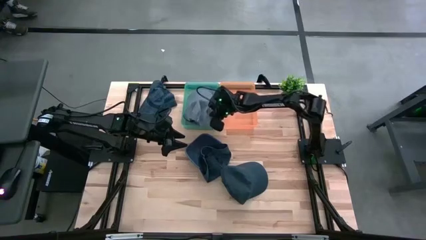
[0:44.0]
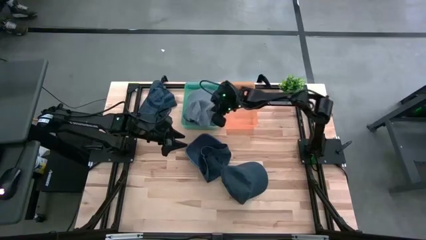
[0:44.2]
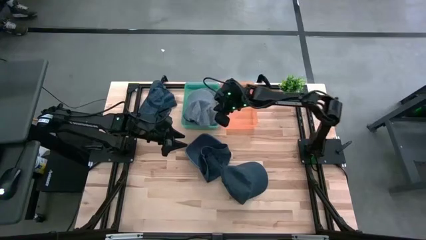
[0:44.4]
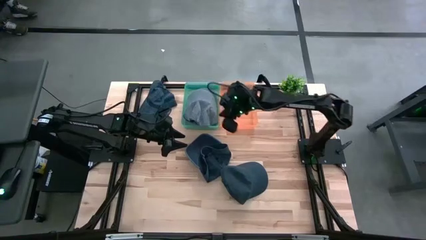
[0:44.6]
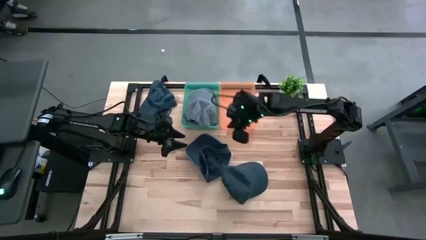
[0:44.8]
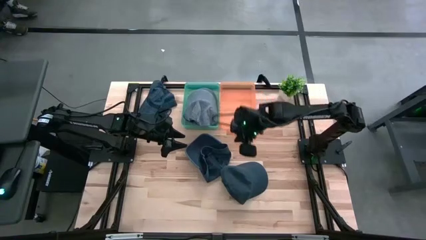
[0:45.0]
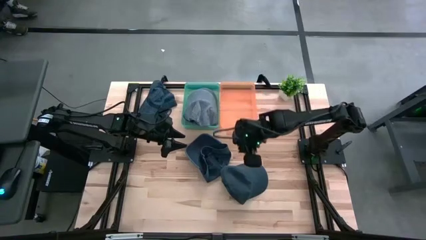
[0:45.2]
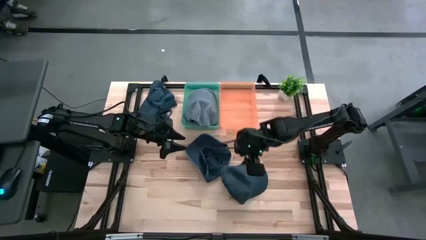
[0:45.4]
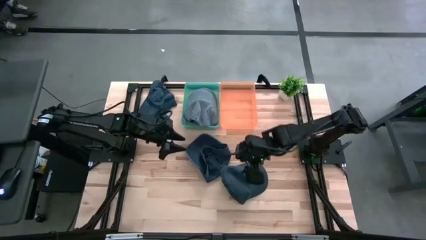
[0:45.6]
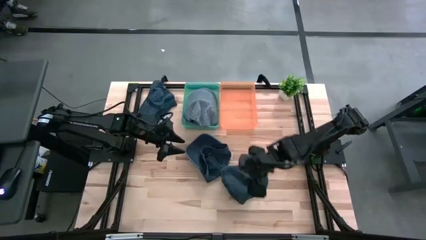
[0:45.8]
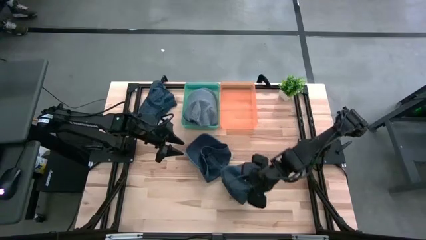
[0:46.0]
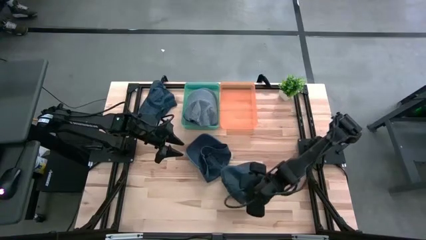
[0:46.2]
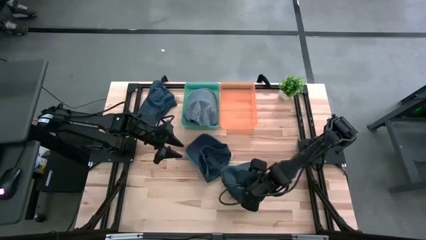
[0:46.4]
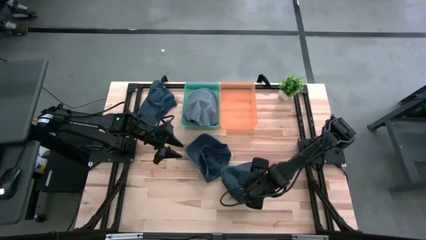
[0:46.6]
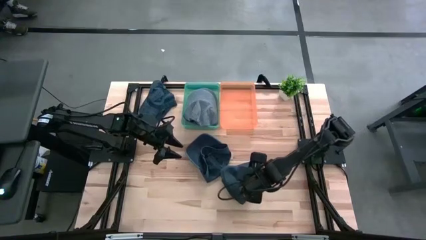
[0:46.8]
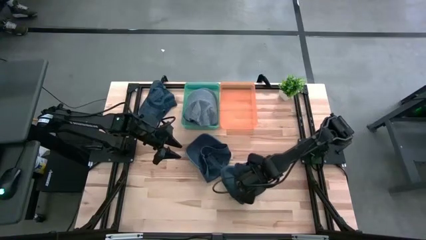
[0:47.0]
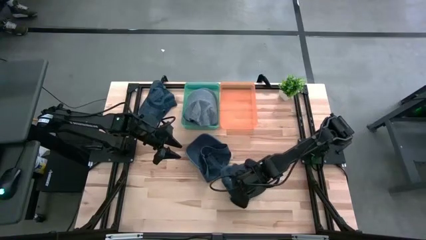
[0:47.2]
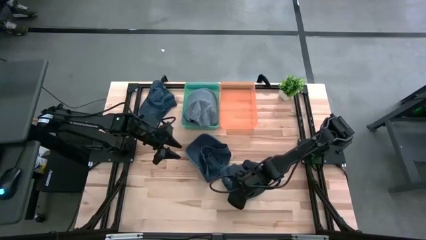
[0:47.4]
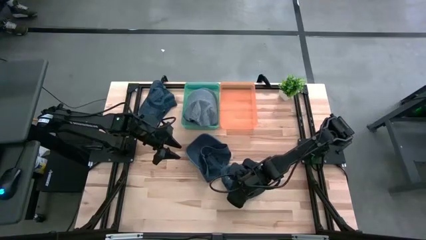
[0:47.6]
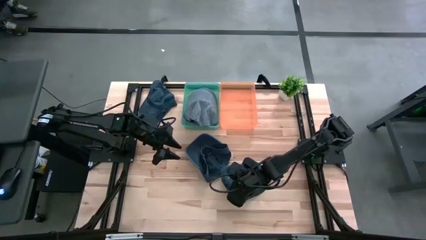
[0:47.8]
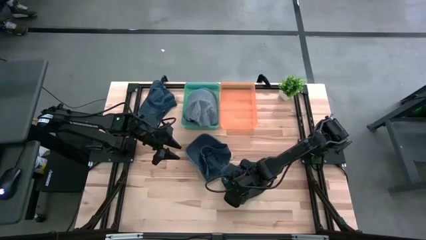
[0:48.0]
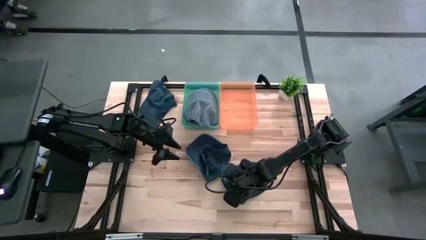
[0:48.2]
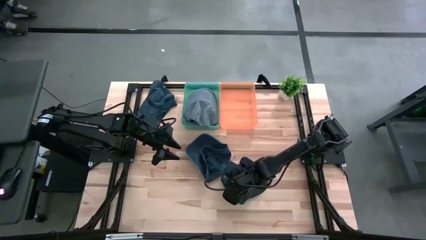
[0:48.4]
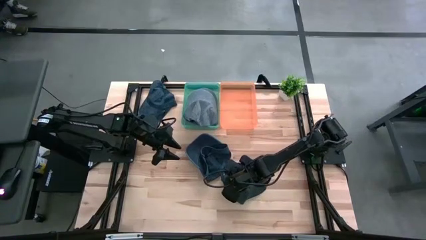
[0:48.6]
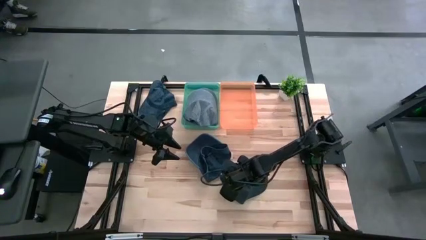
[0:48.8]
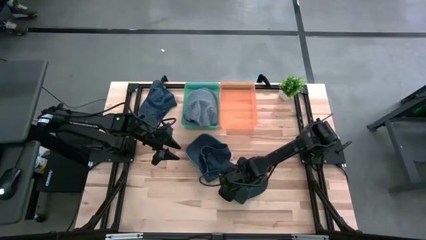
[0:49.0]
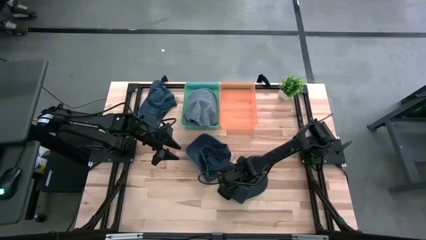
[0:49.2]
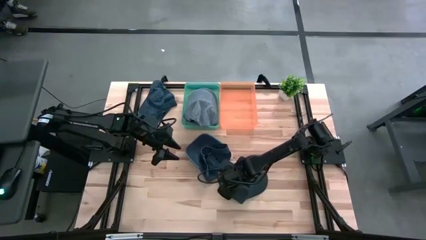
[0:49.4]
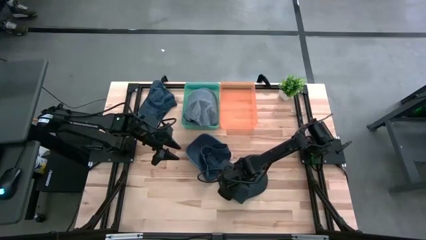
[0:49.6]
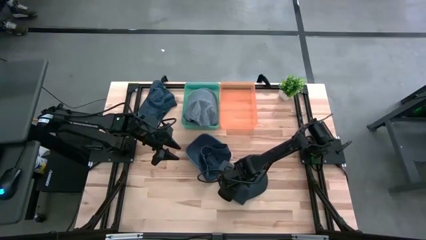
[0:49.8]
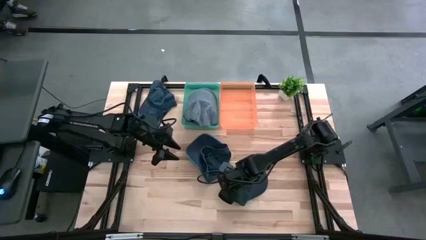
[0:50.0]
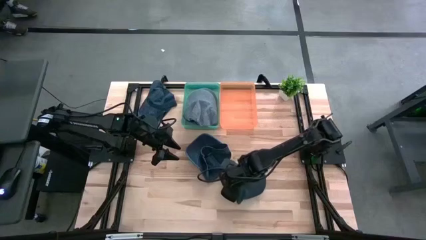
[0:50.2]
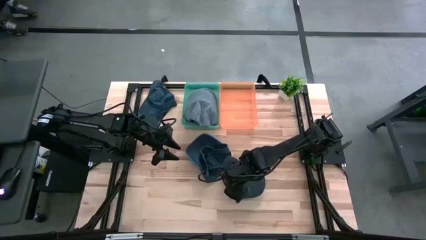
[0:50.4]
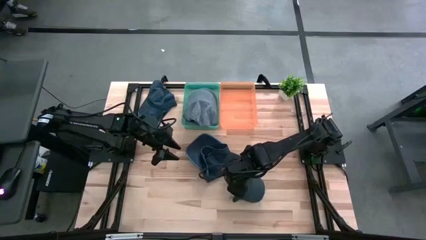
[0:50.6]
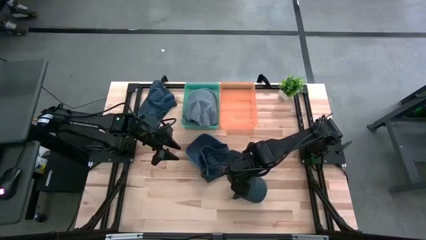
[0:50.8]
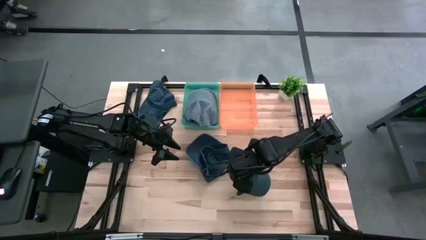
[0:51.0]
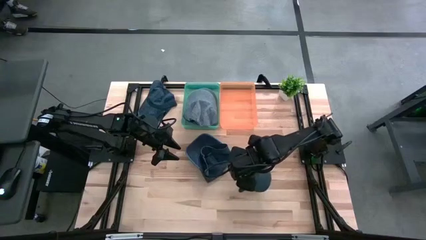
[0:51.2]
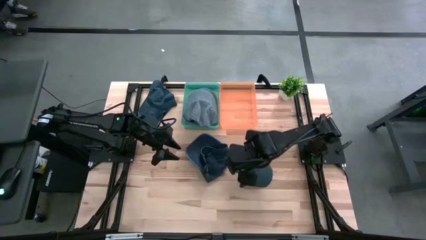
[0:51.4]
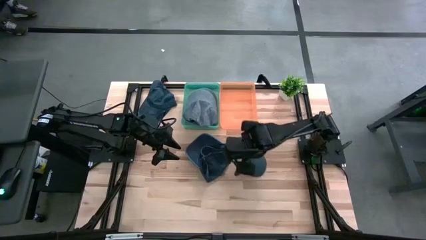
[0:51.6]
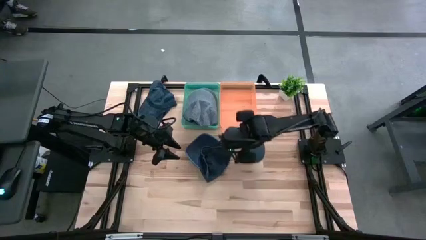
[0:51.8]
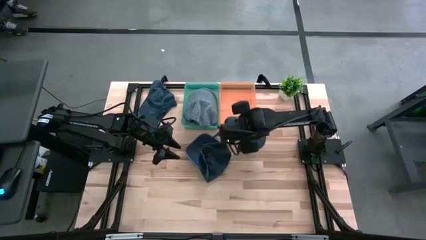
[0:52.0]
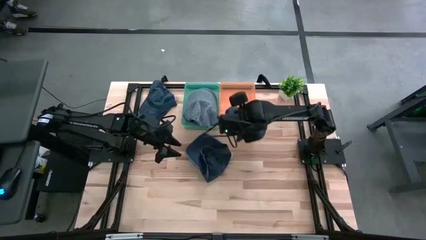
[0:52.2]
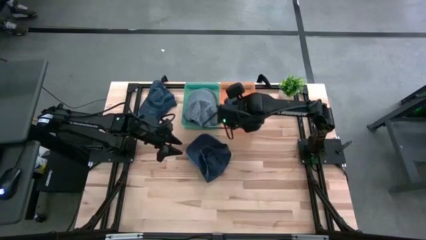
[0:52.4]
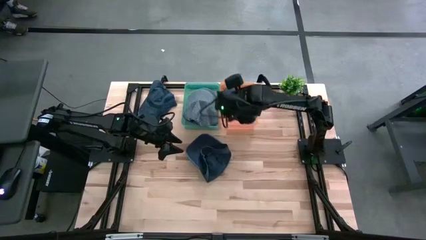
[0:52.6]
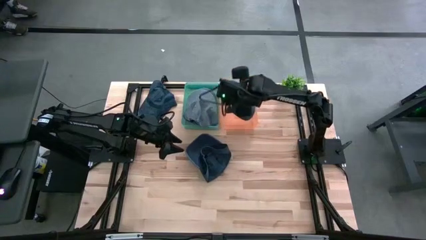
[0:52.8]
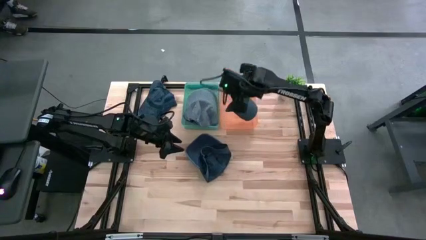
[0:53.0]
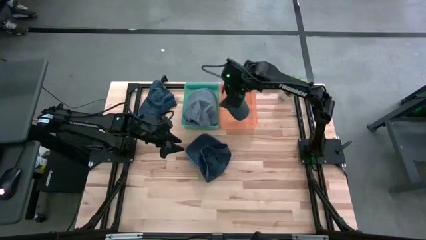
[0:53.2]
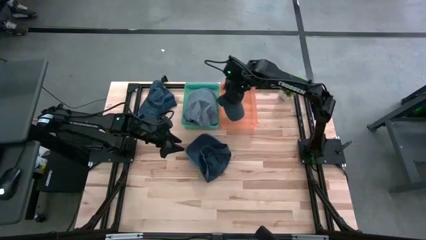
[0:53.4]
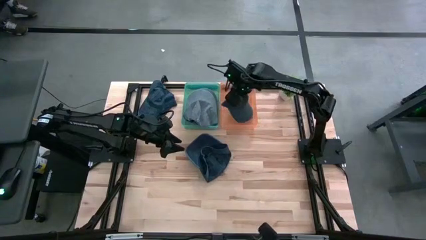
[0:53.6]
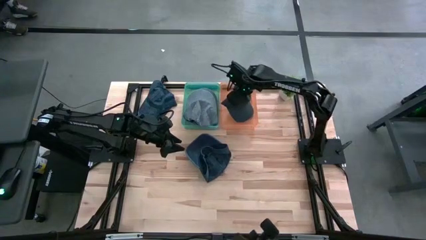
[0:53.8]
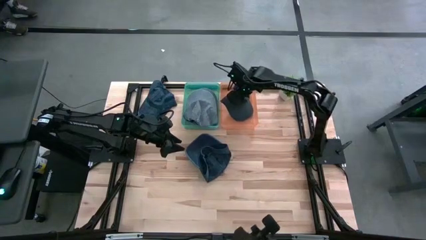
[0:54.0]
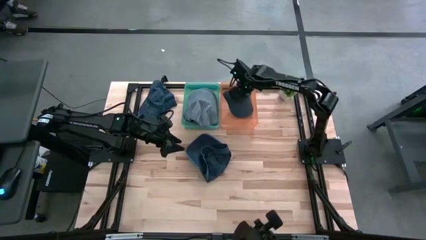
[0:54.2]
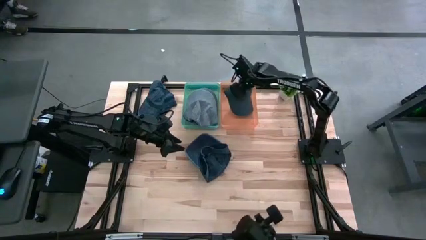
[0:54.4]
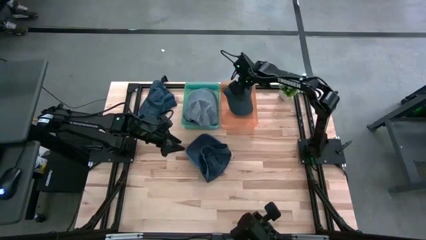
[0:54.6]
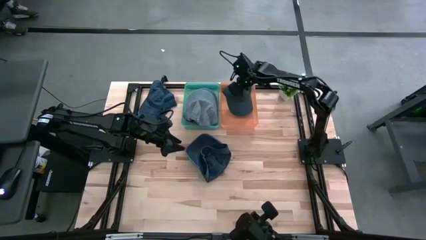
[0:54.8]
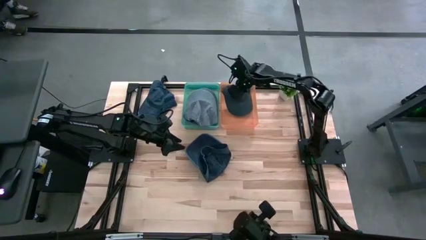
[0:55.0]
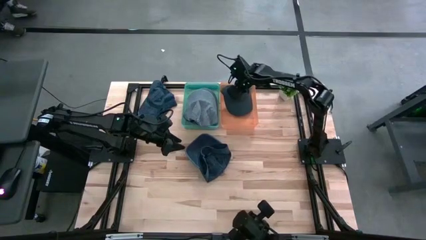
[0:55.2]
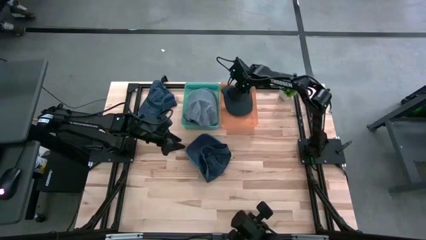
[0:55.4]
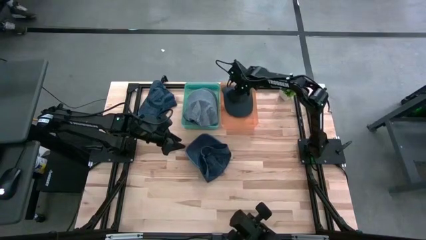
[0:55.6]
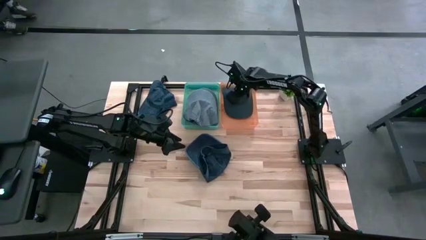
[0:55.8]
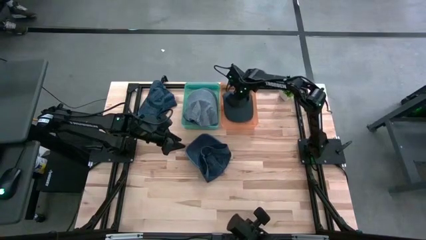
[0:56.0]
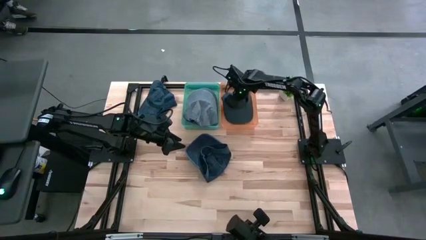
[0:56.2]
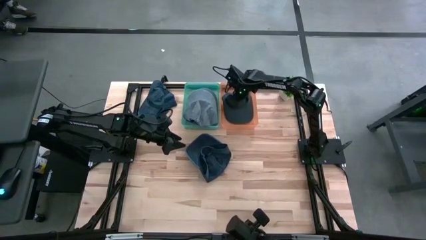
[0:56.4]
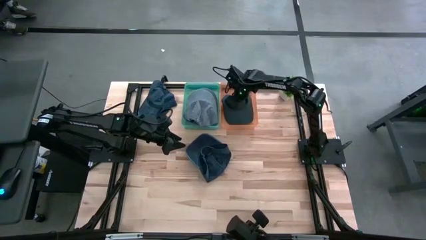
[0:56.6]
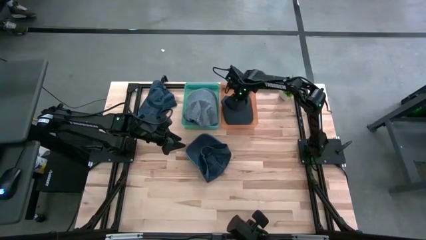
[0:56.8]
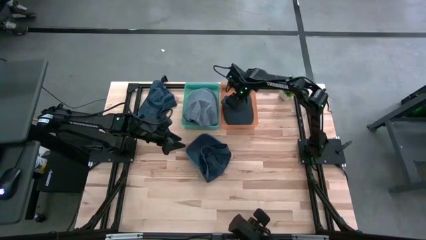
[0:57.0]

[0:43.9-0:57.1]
Task: Pick & Place hat
Put the bottom right black cap into the orange bin
